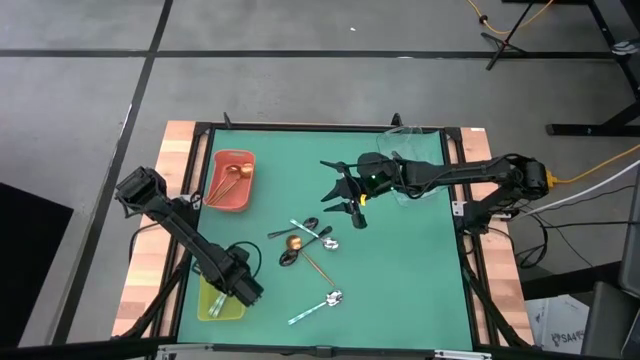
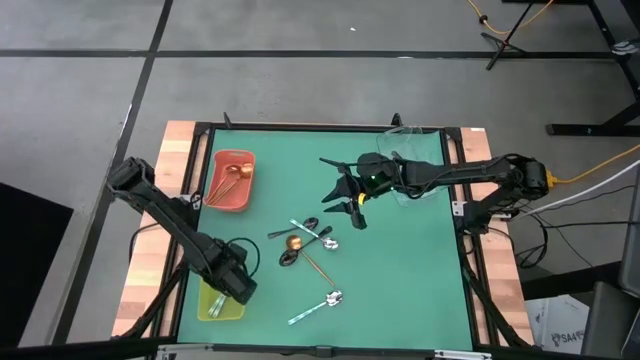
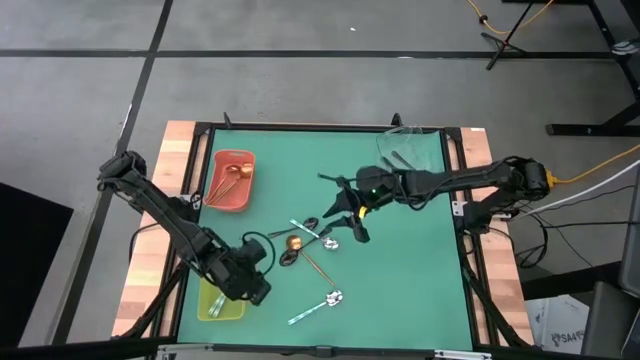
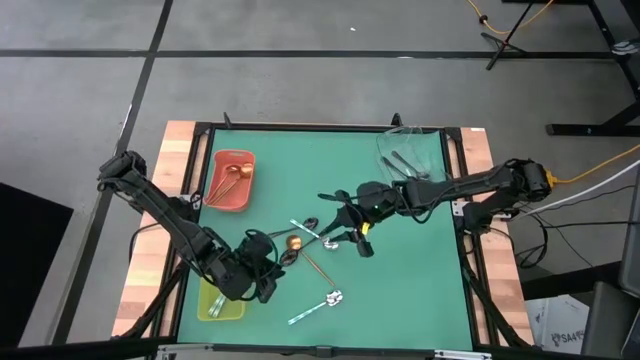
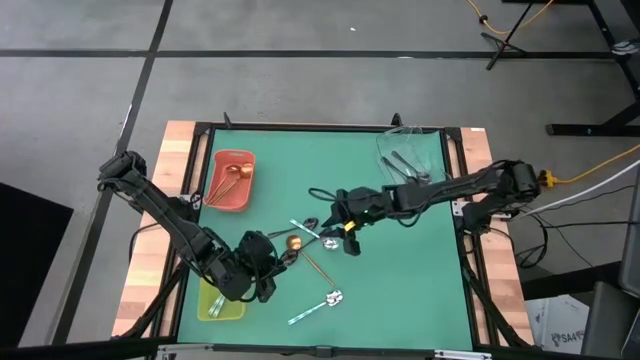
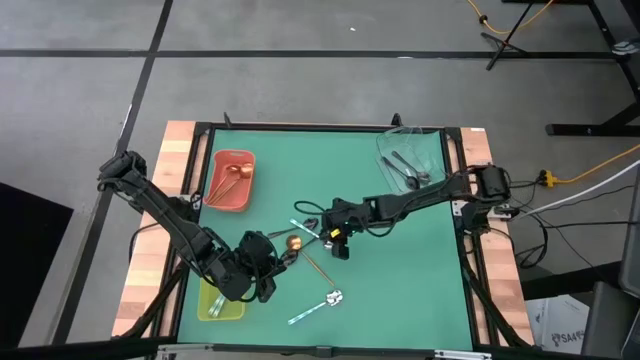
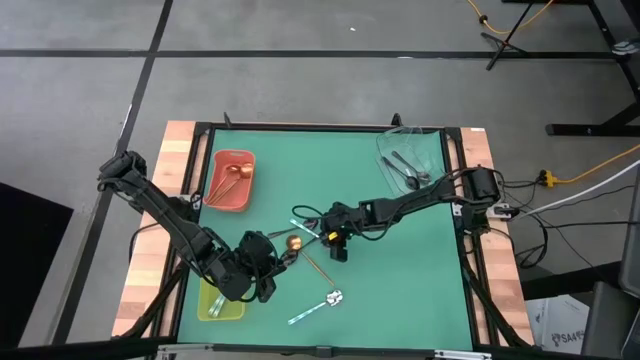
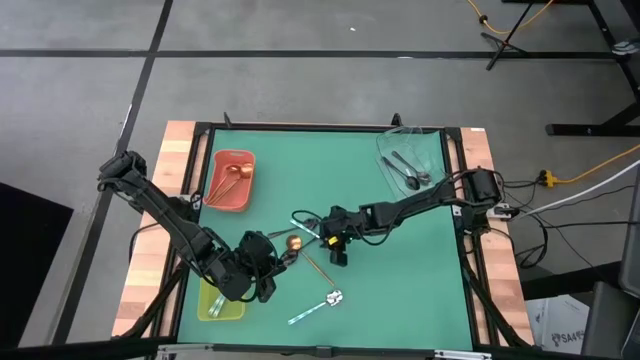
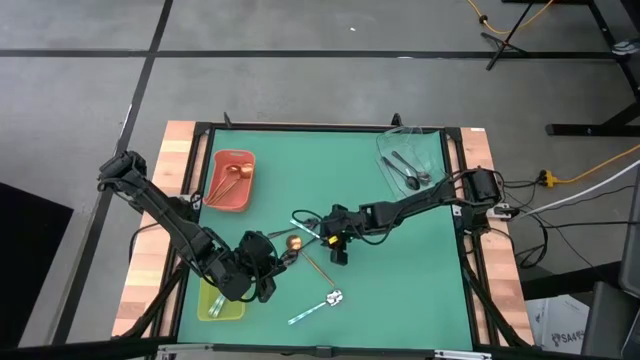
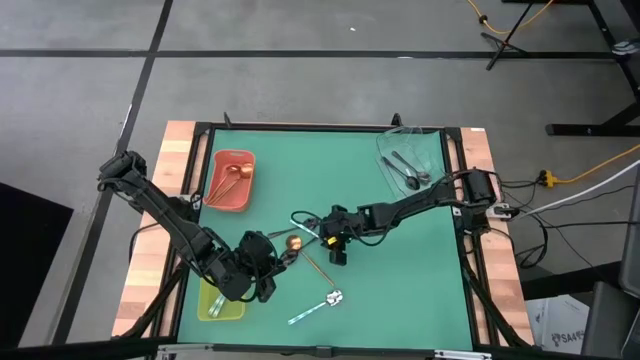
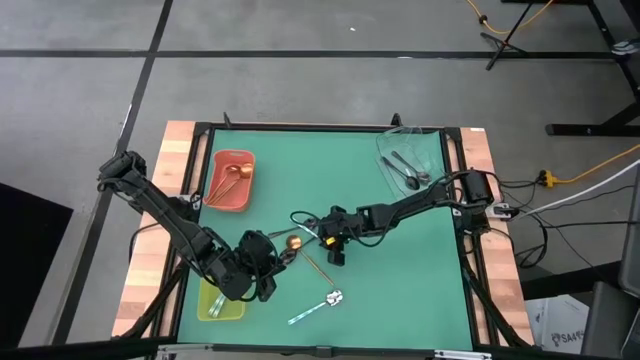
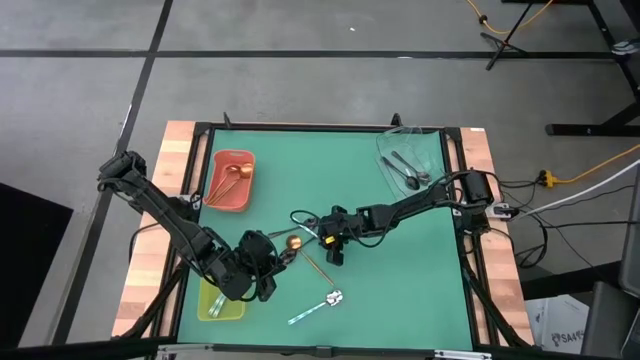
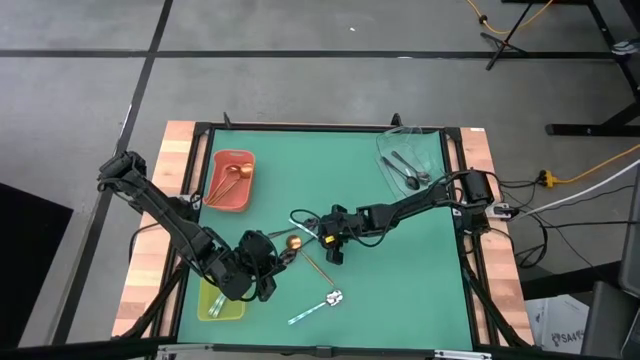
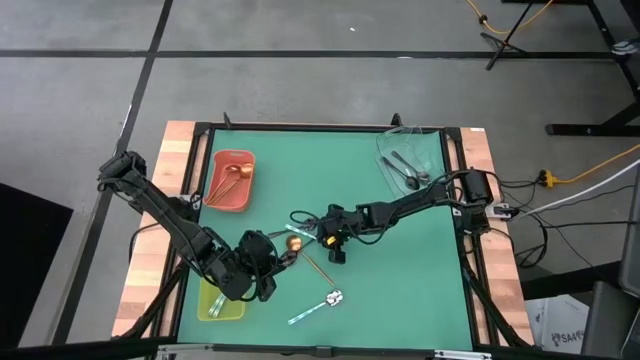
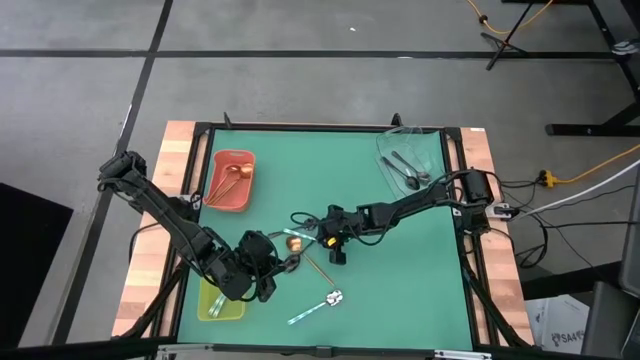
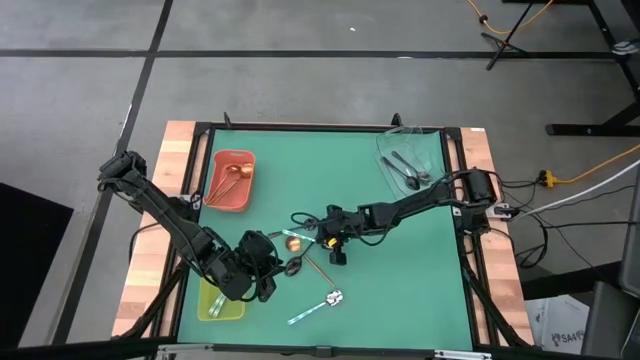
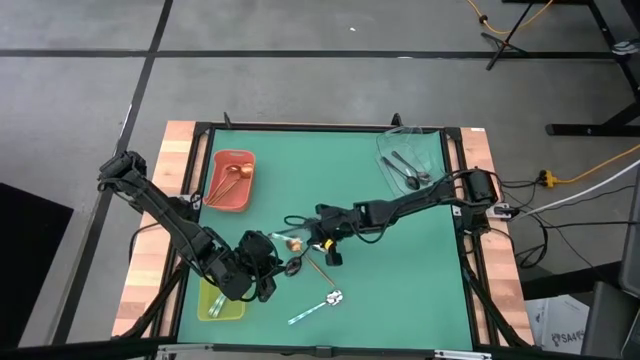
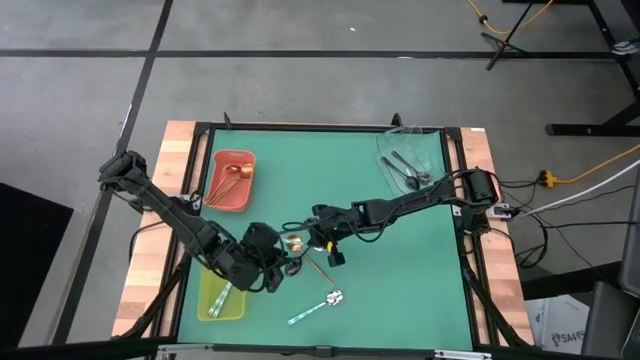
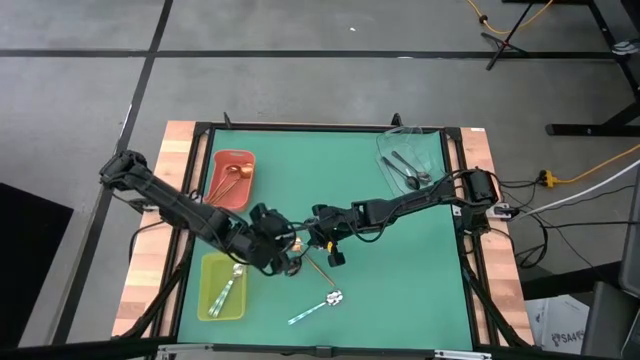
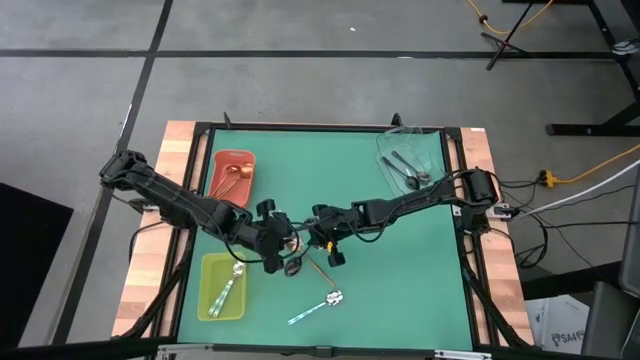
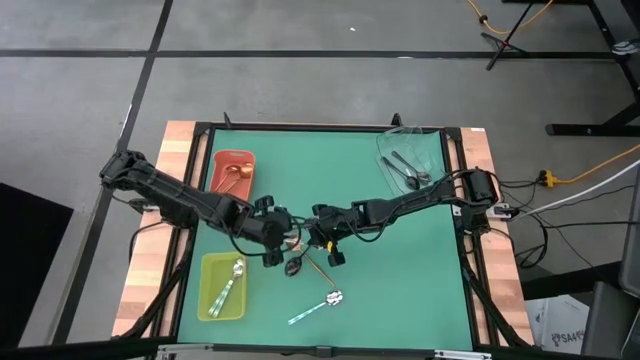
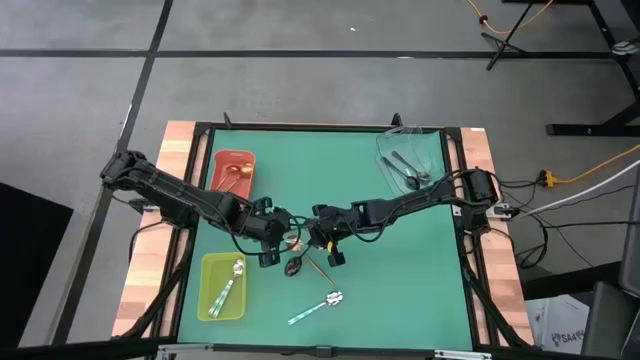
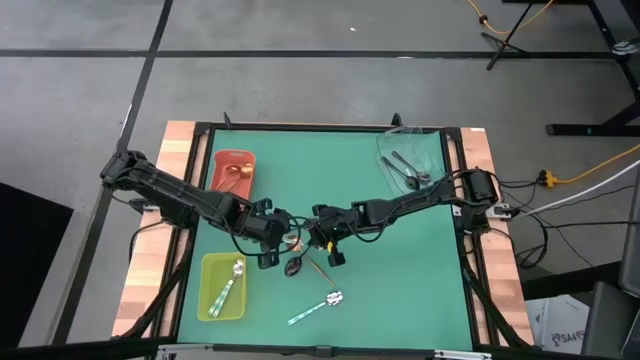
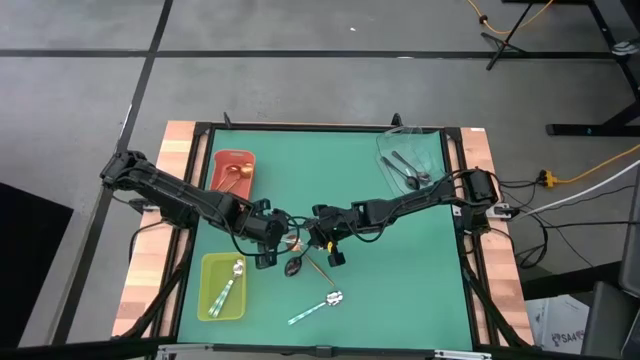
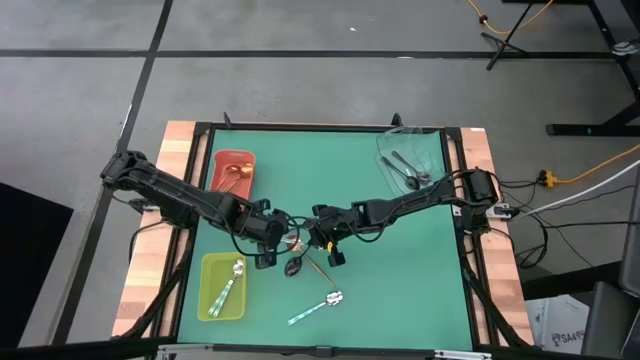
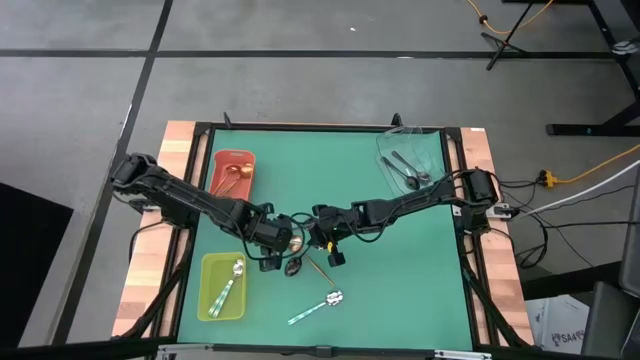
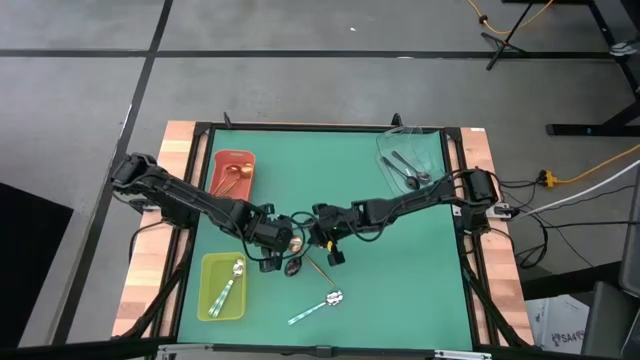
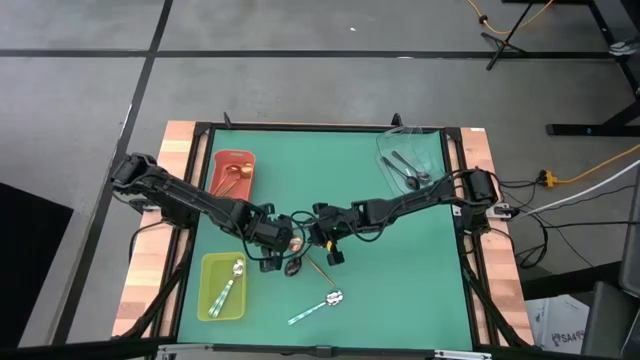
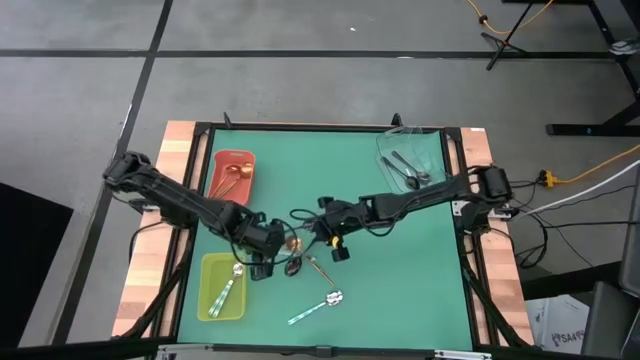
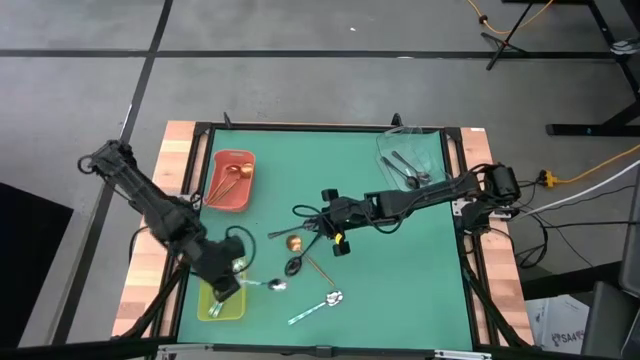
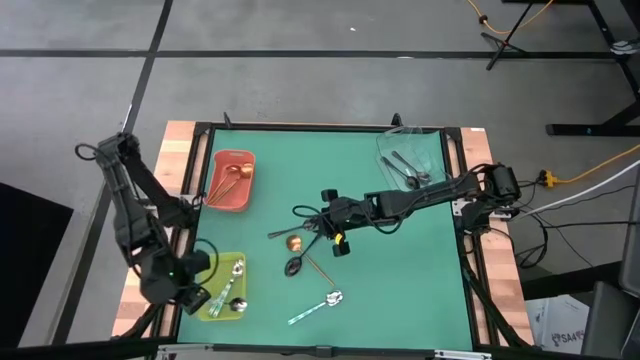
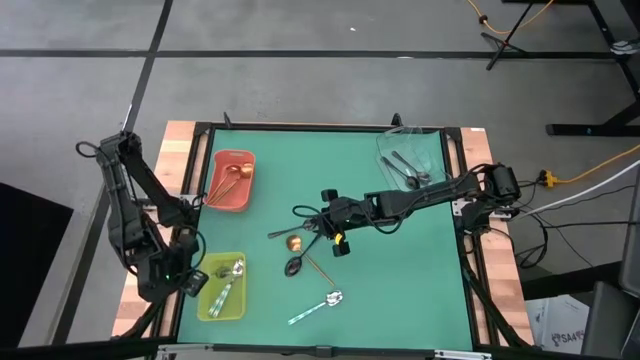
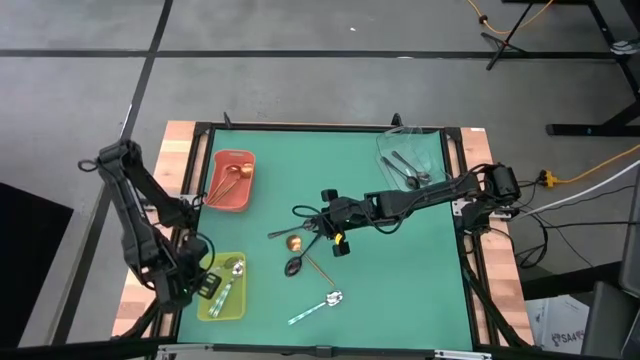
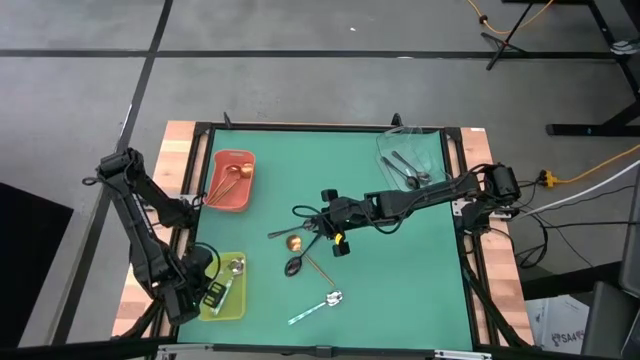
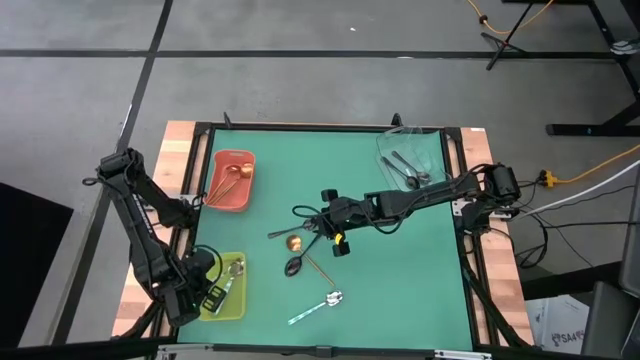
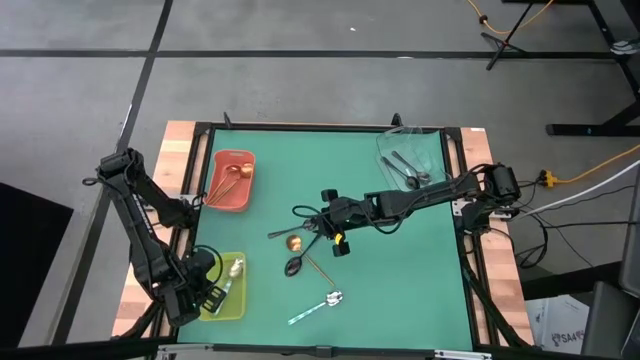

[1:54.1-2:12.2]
Task: Sort silverware by color (type)
Put the blue patterned spoon into the yellow bin

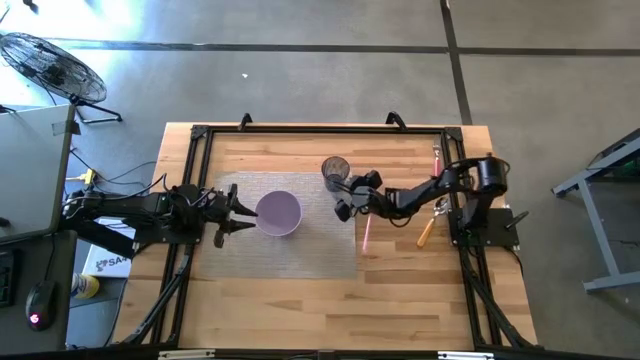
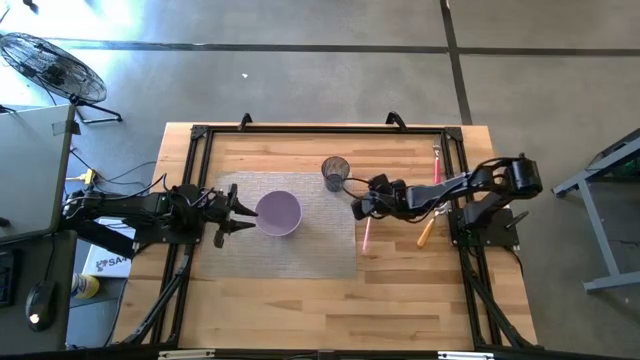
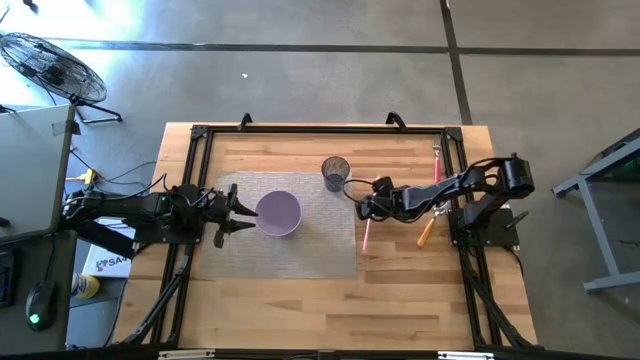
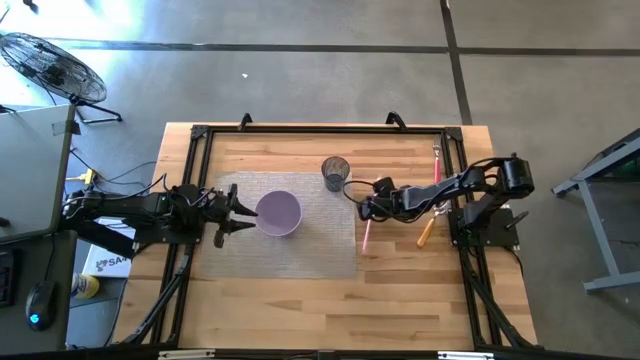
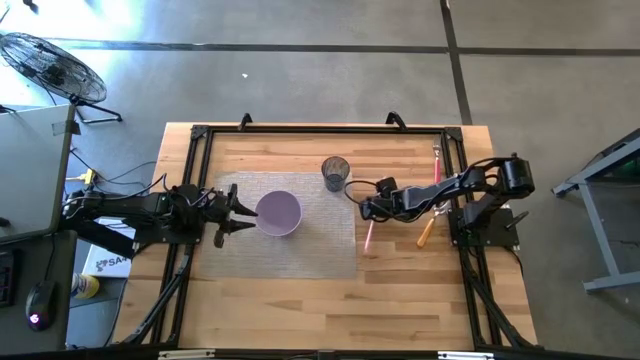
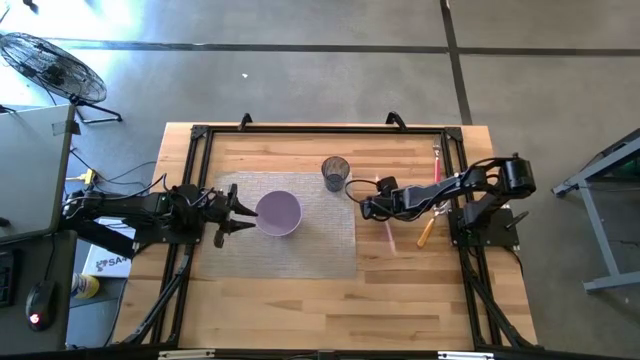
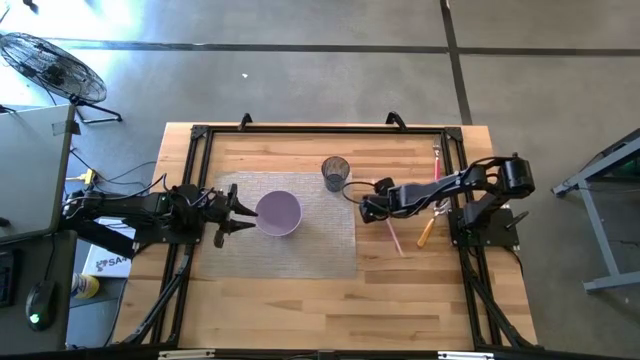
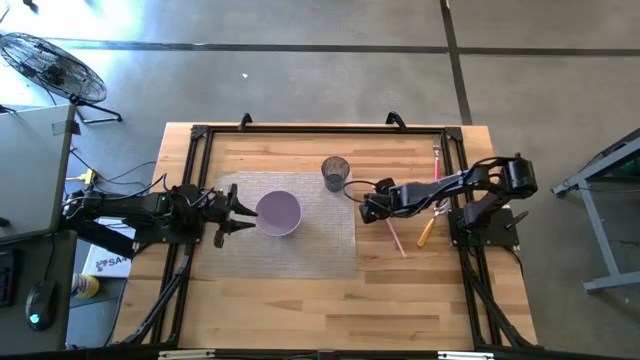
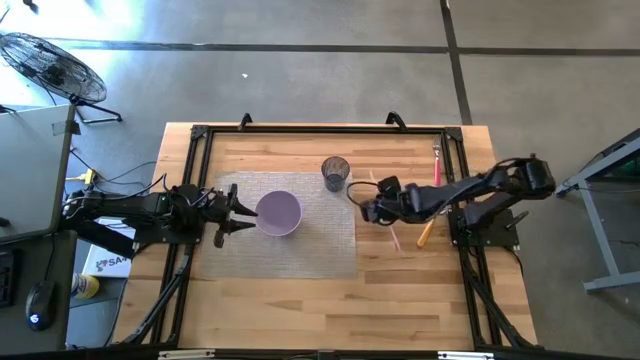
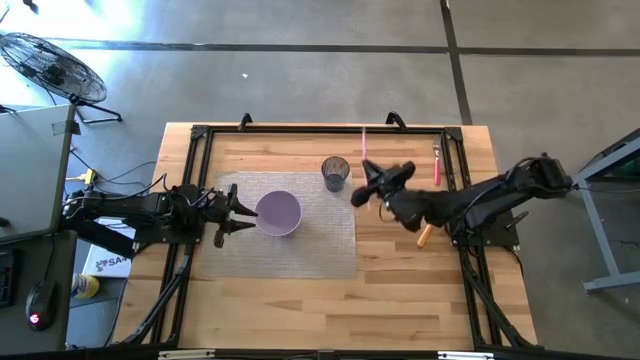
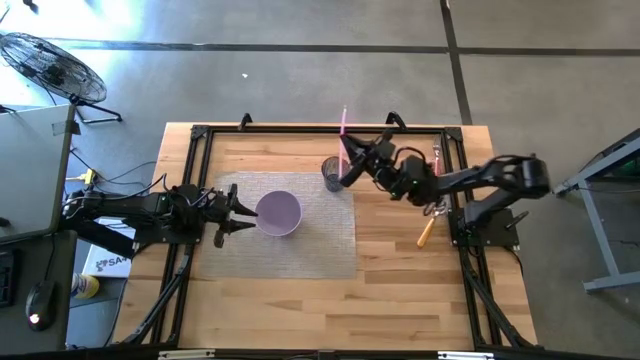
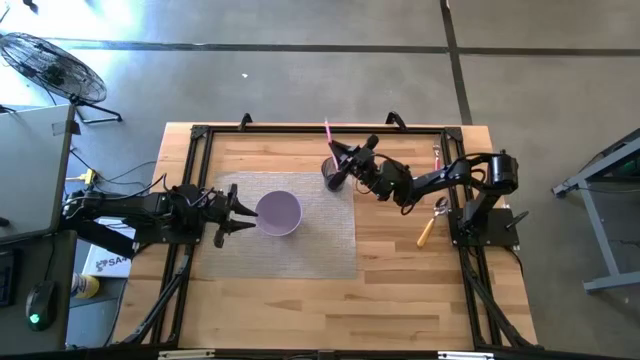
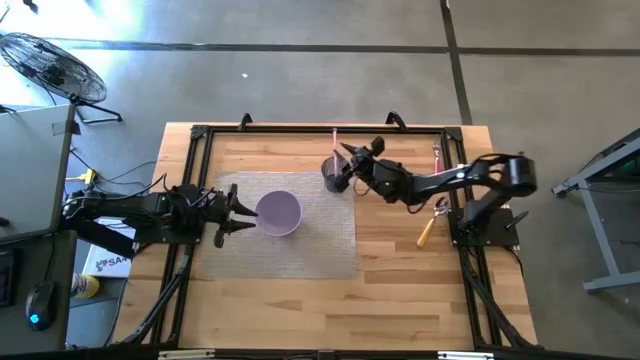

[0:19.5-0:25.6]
Task: Pick & Place Utensil
Put the red straw into the blue cup
